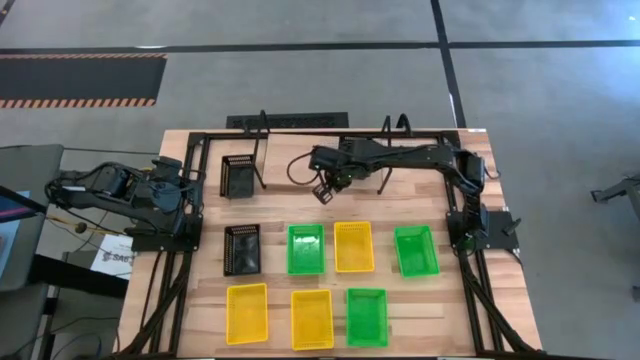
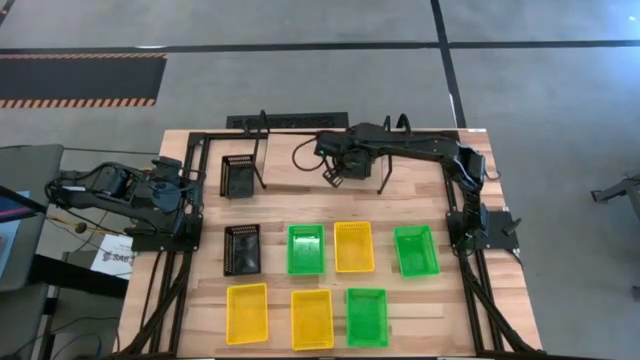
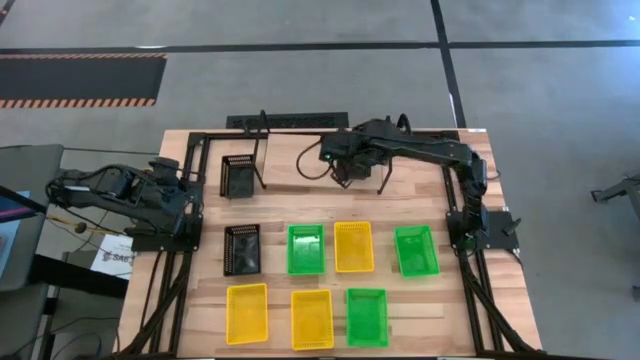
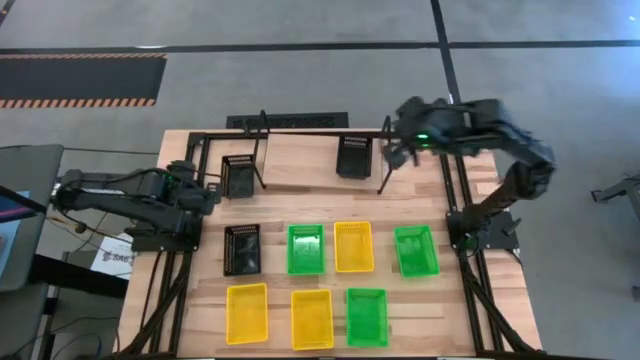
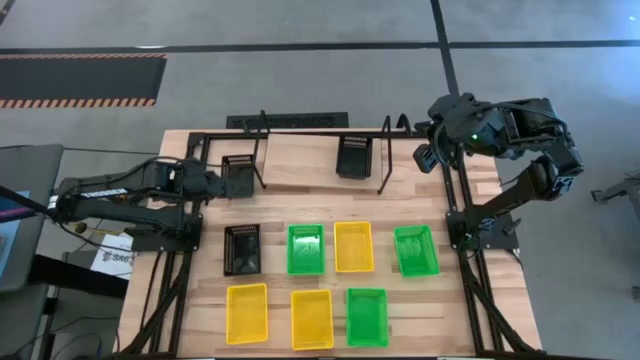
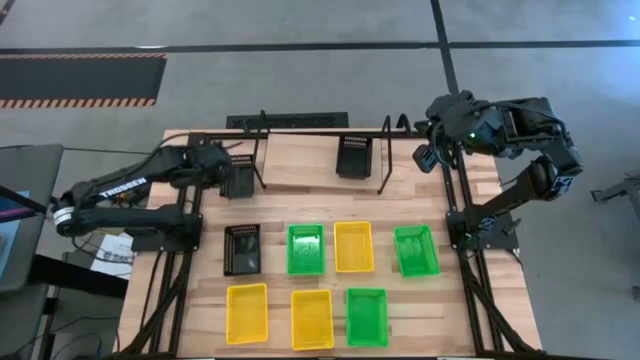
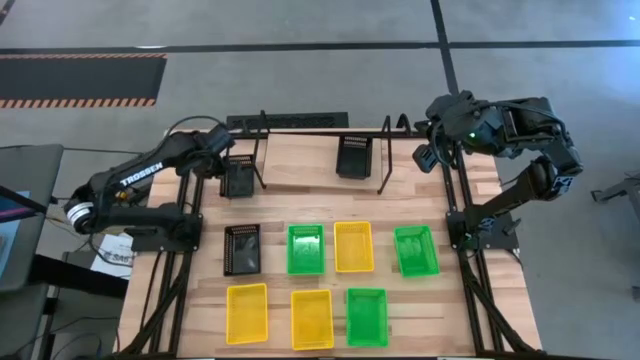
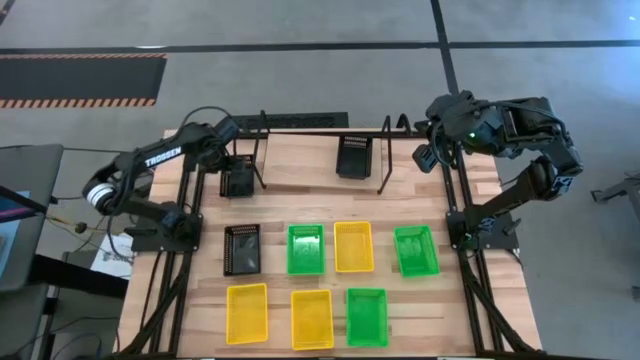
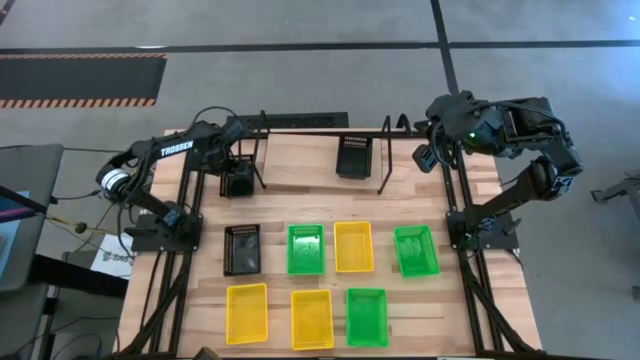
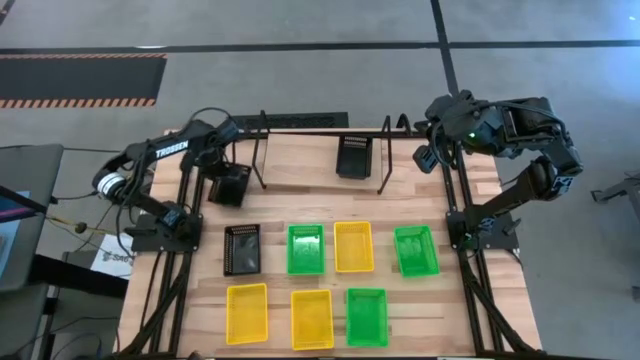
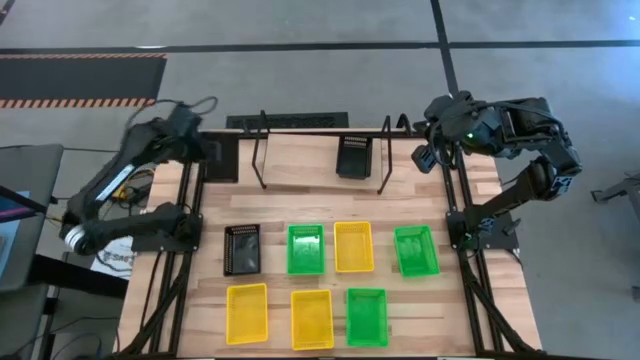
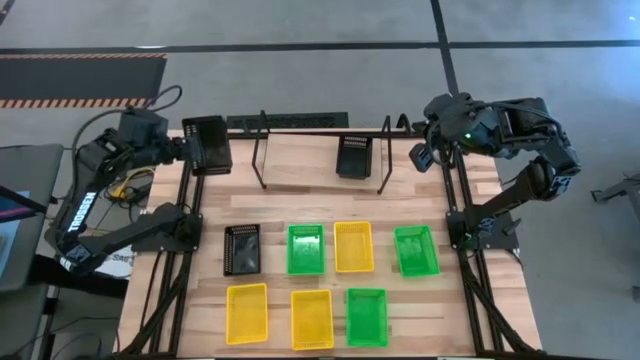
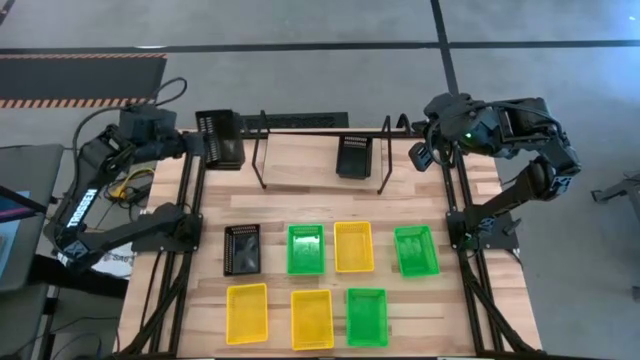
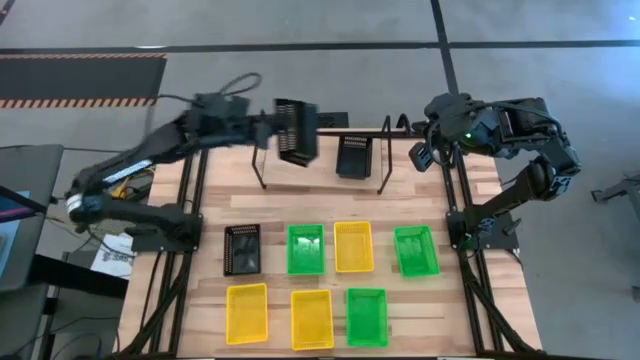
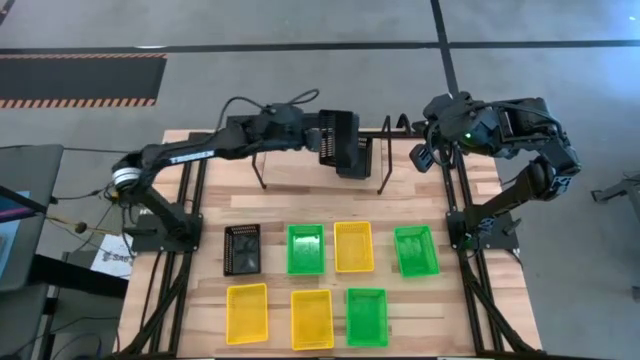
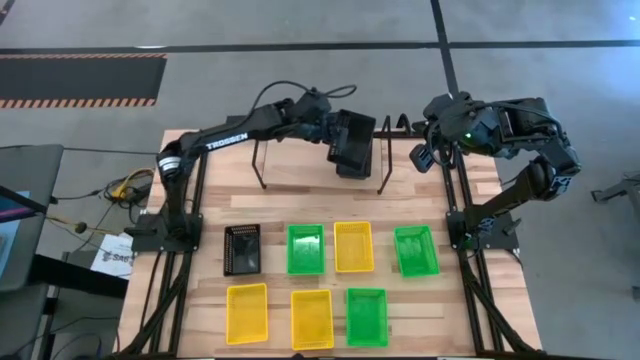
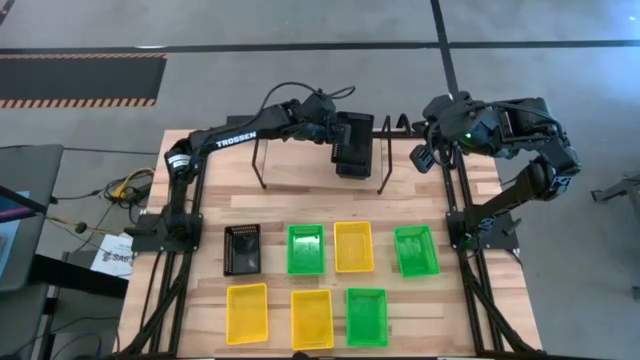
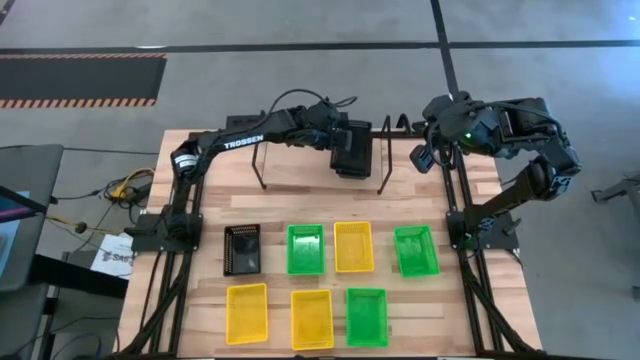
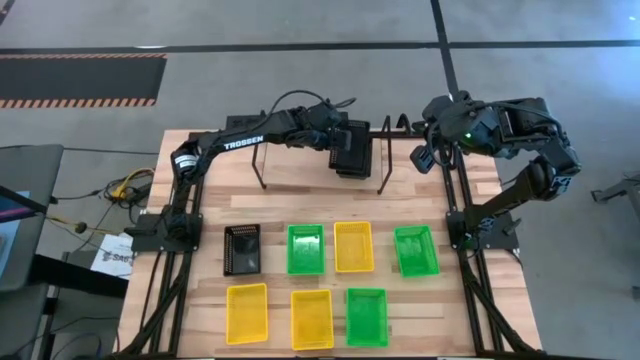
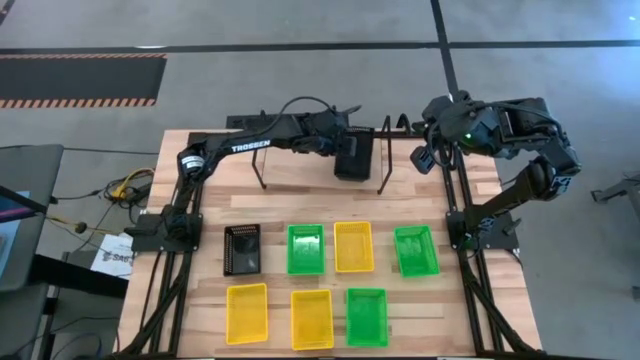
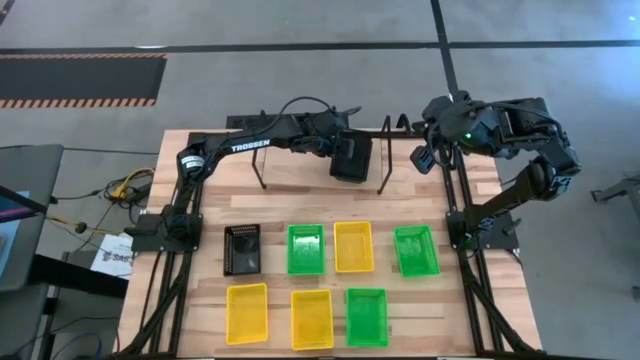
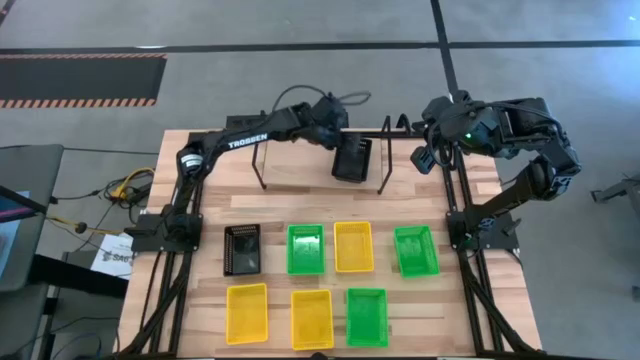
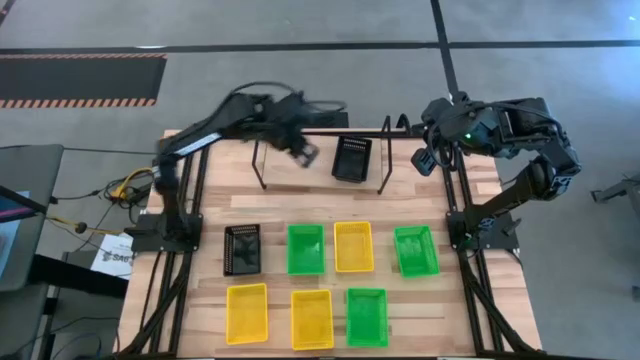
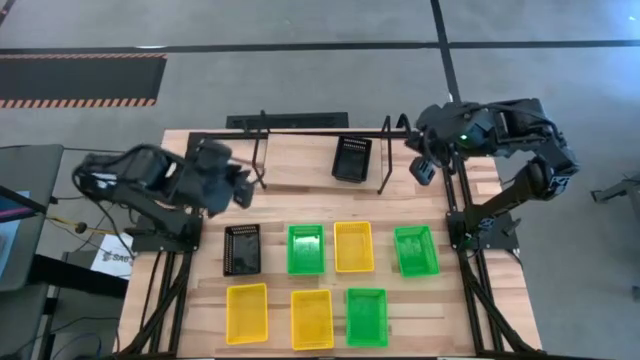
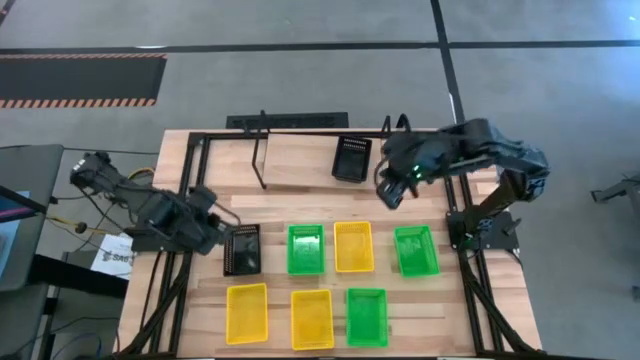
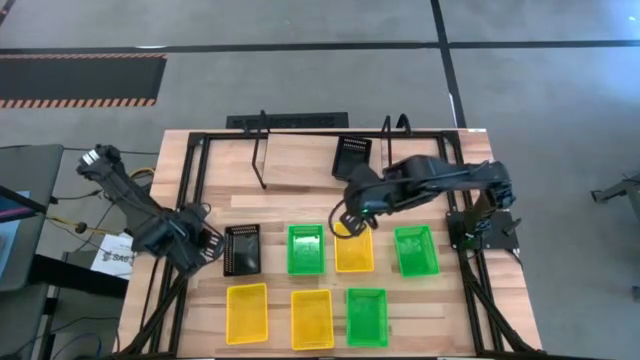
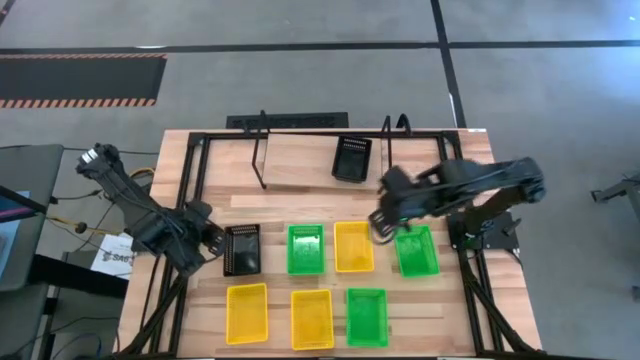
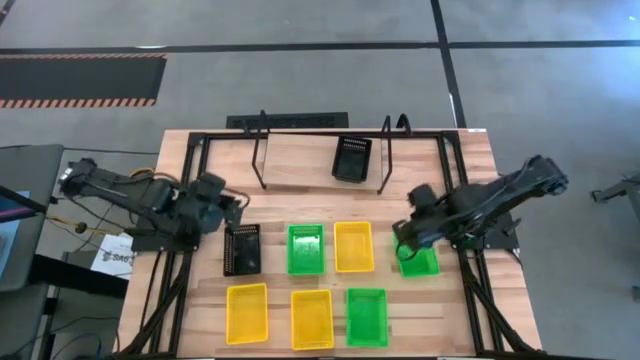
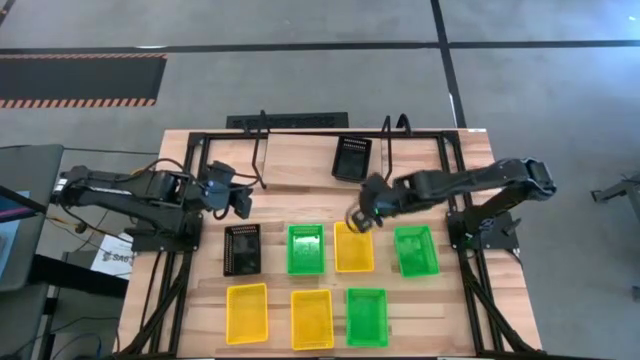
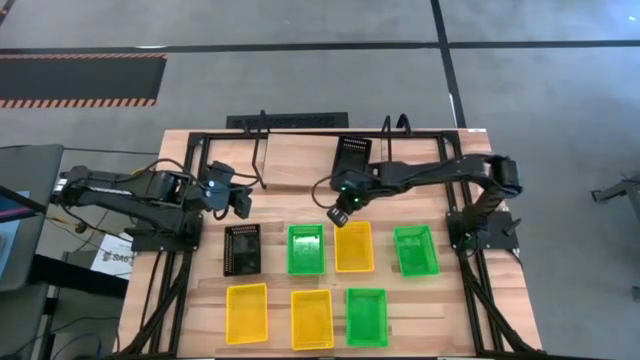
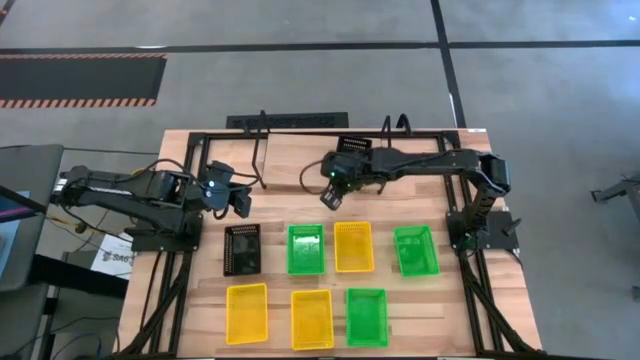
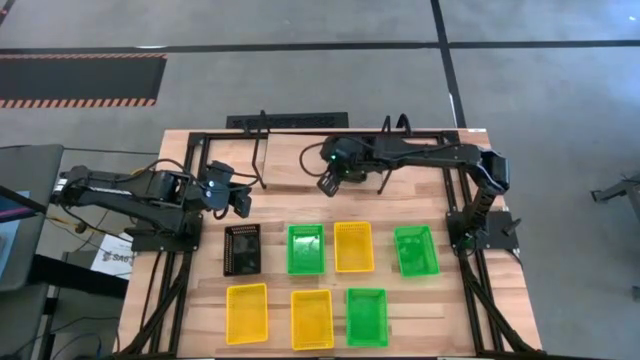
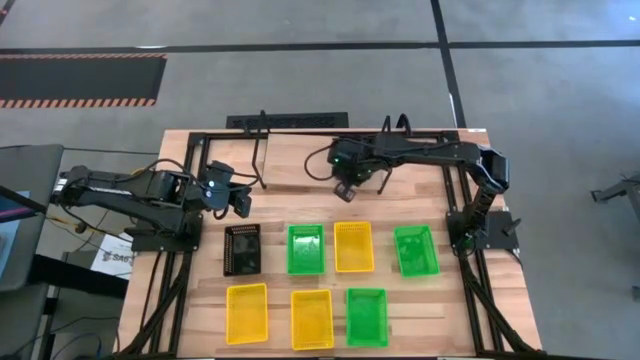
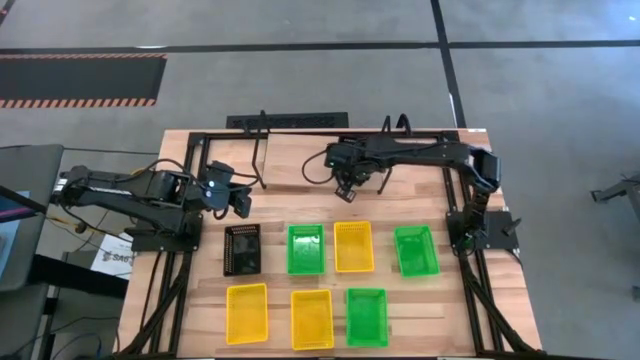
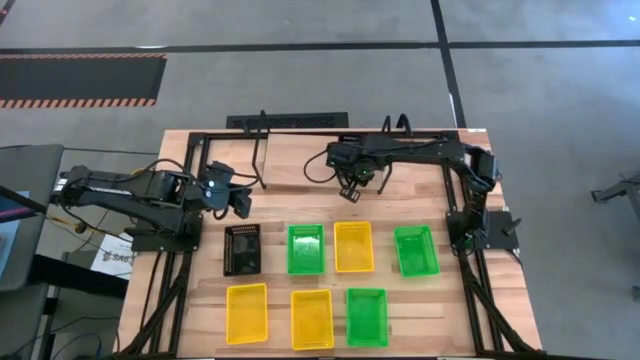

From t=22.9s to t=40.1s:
Task: Stack baskets on shelf by color
Stack the left black basket on top of the other black basket on the shelf
